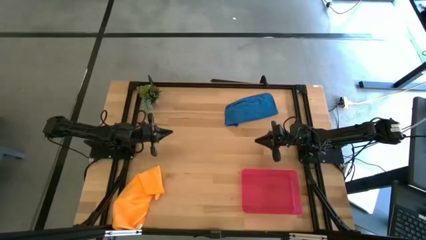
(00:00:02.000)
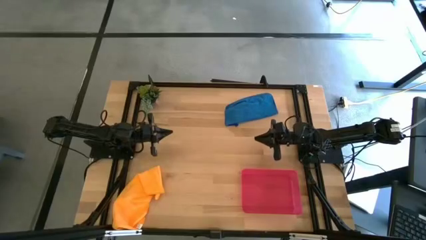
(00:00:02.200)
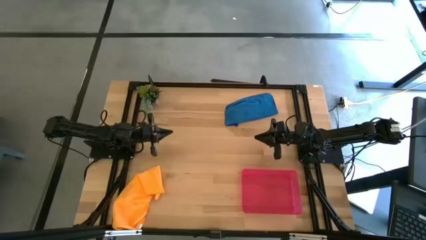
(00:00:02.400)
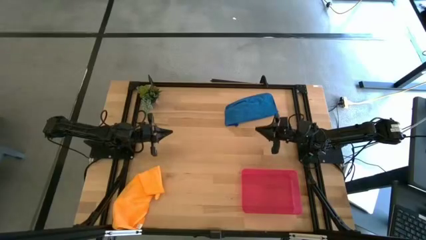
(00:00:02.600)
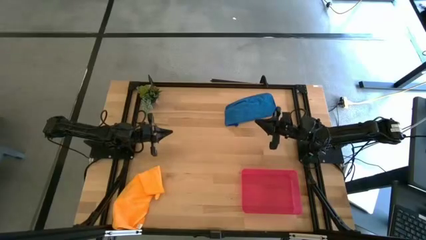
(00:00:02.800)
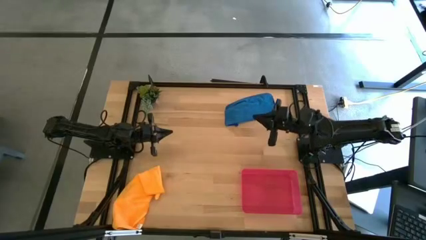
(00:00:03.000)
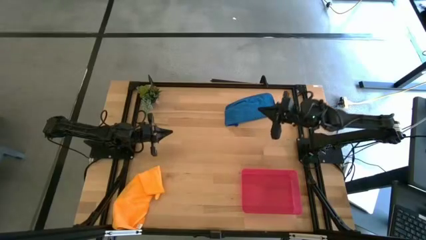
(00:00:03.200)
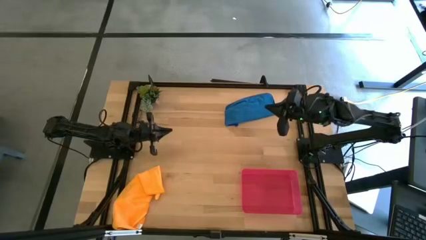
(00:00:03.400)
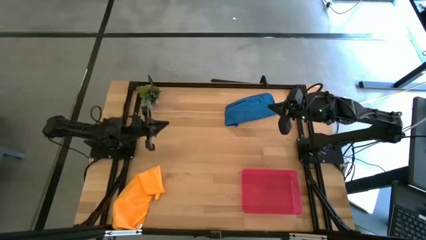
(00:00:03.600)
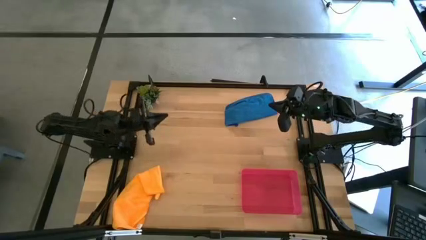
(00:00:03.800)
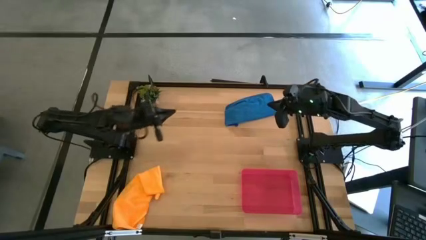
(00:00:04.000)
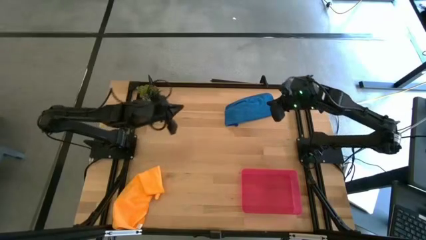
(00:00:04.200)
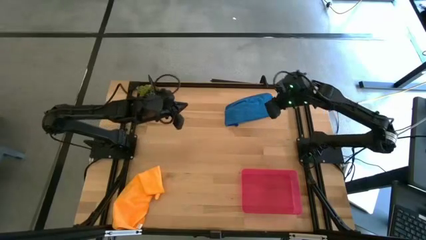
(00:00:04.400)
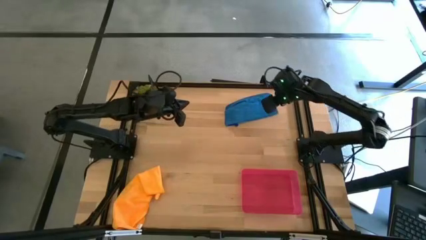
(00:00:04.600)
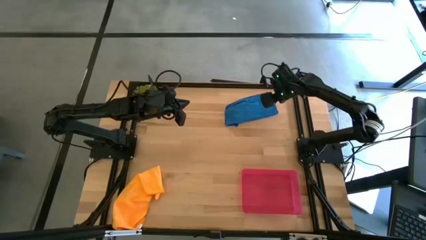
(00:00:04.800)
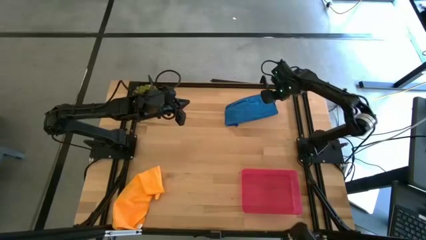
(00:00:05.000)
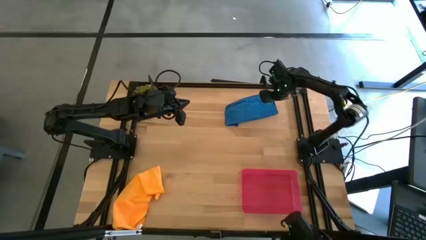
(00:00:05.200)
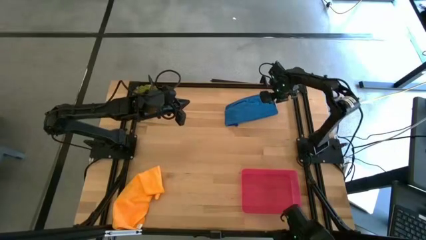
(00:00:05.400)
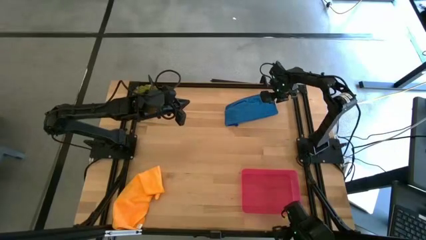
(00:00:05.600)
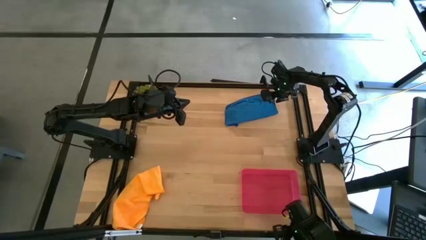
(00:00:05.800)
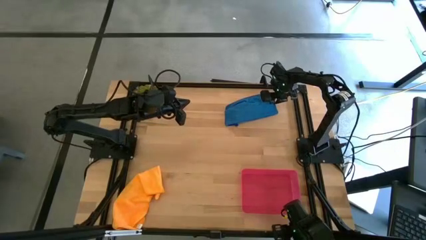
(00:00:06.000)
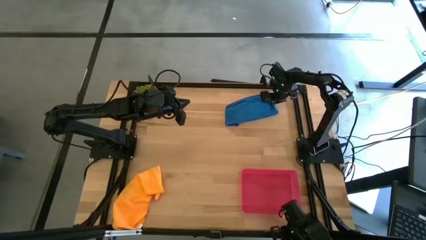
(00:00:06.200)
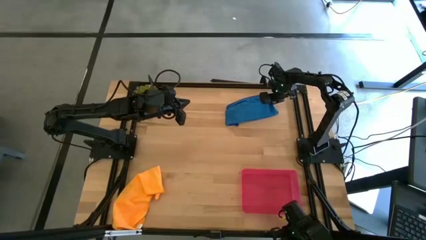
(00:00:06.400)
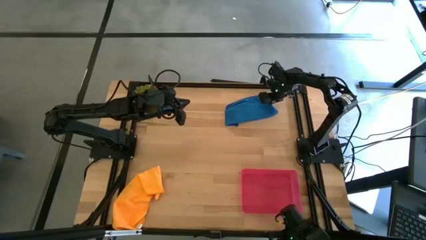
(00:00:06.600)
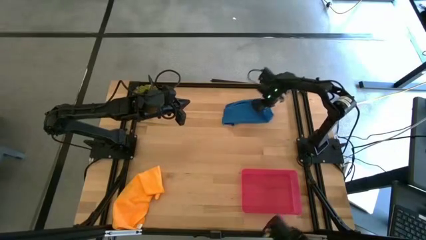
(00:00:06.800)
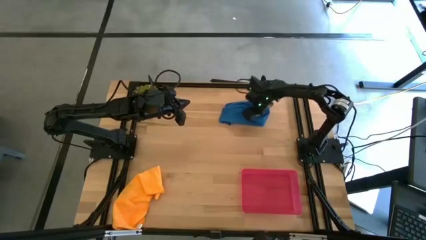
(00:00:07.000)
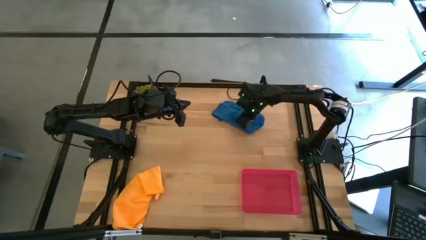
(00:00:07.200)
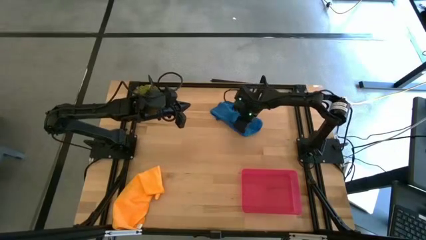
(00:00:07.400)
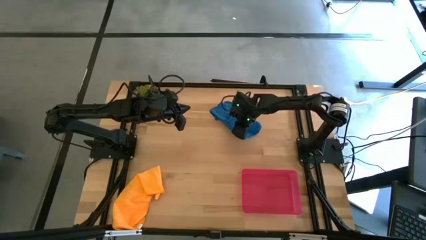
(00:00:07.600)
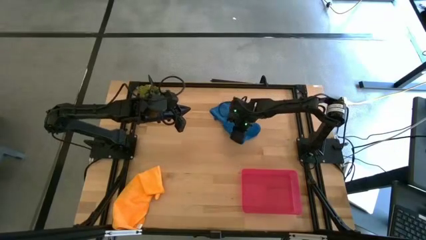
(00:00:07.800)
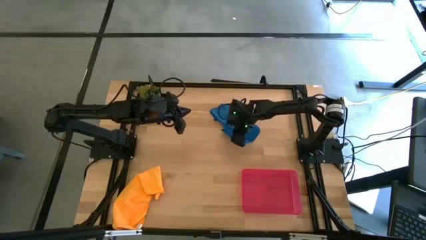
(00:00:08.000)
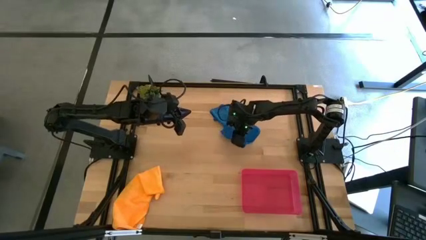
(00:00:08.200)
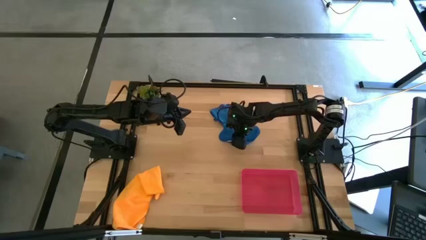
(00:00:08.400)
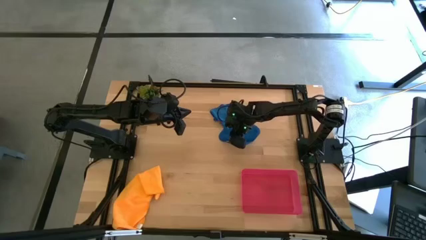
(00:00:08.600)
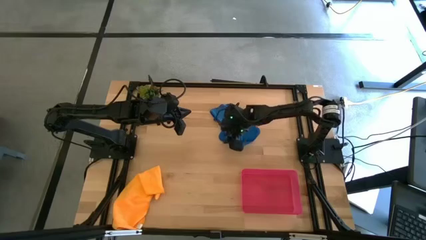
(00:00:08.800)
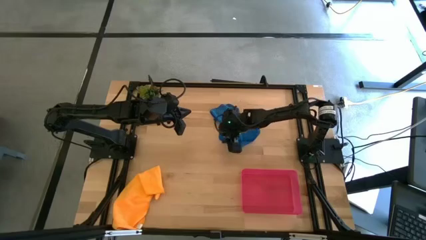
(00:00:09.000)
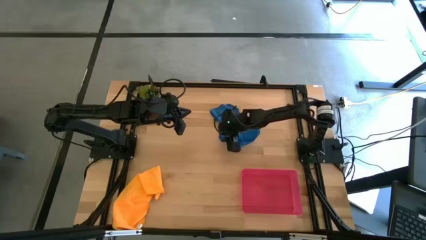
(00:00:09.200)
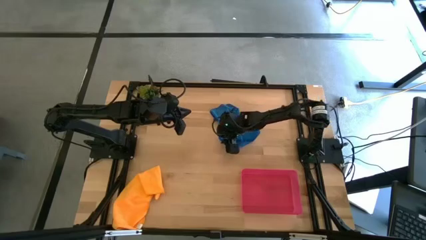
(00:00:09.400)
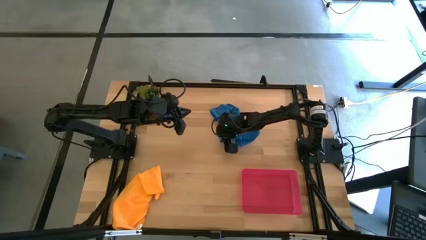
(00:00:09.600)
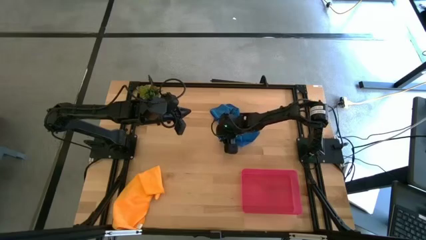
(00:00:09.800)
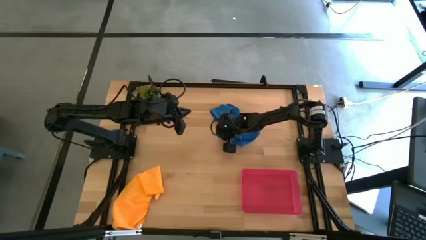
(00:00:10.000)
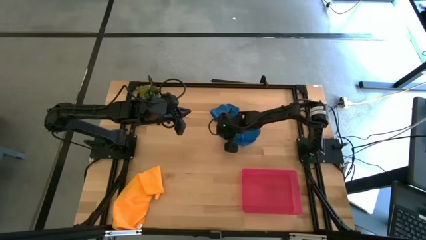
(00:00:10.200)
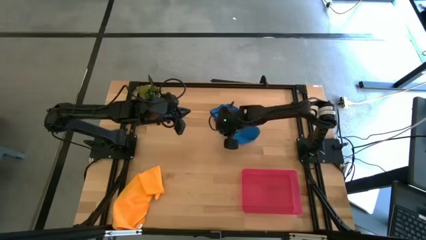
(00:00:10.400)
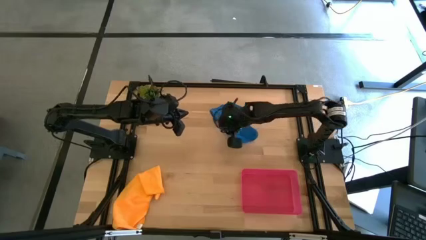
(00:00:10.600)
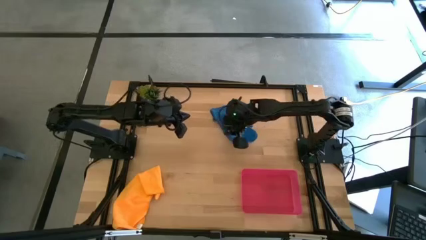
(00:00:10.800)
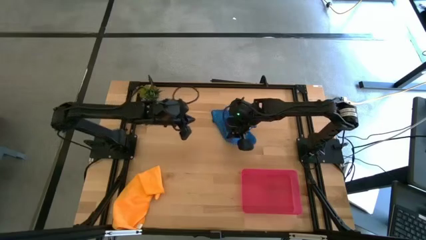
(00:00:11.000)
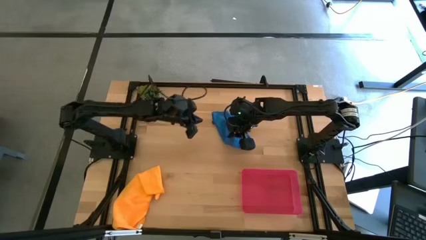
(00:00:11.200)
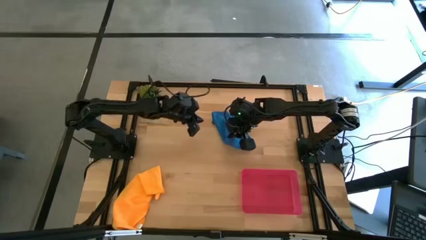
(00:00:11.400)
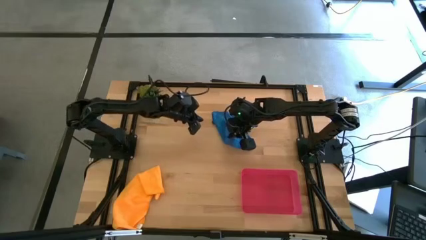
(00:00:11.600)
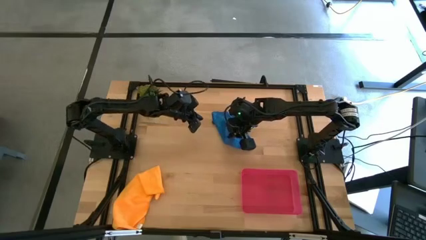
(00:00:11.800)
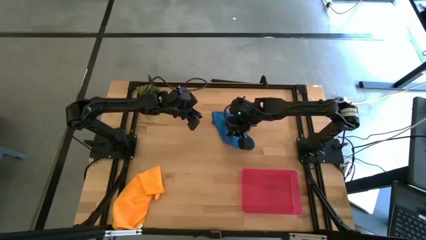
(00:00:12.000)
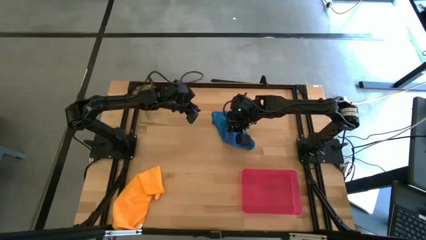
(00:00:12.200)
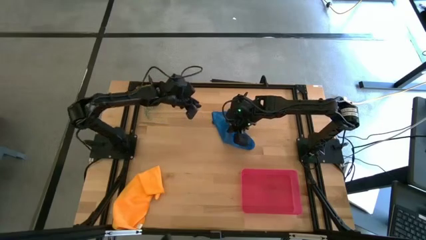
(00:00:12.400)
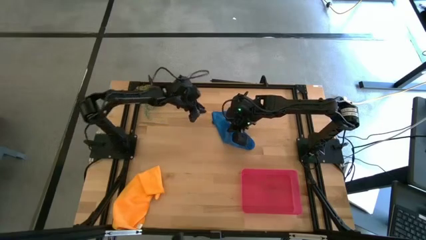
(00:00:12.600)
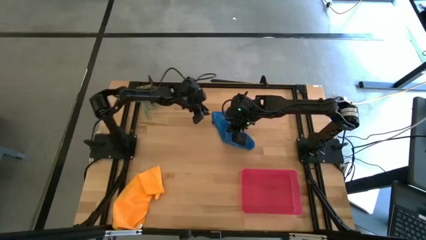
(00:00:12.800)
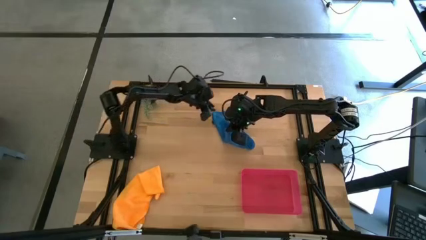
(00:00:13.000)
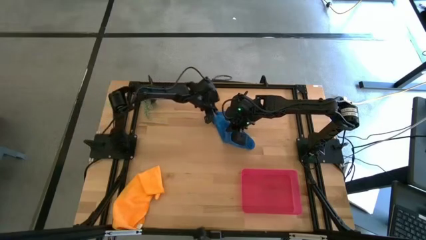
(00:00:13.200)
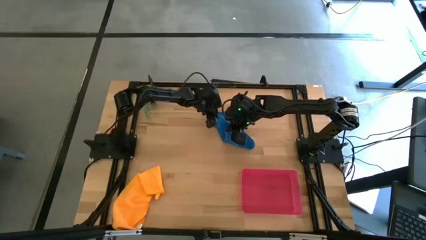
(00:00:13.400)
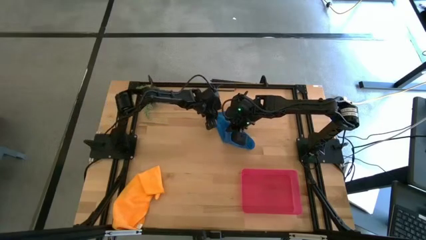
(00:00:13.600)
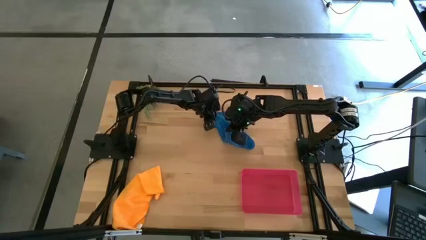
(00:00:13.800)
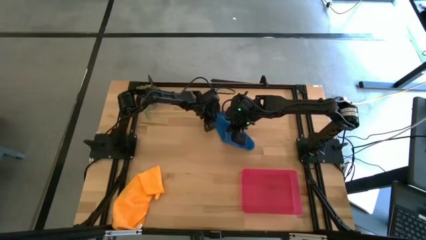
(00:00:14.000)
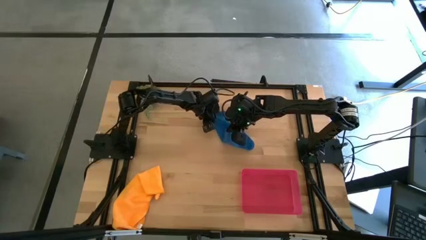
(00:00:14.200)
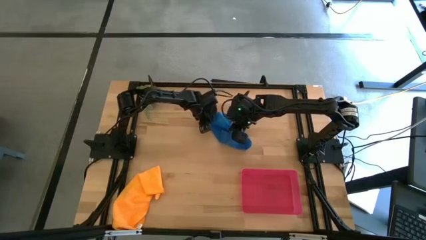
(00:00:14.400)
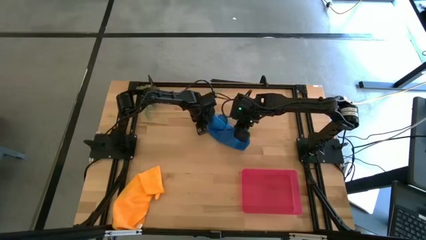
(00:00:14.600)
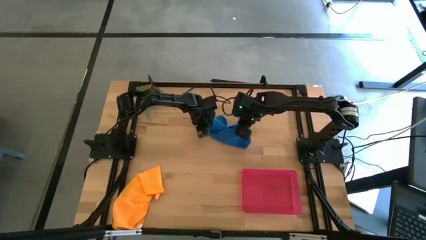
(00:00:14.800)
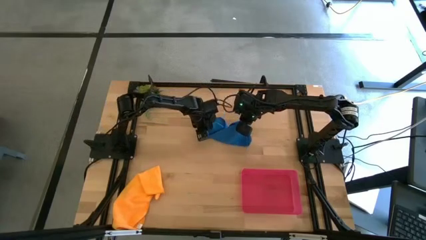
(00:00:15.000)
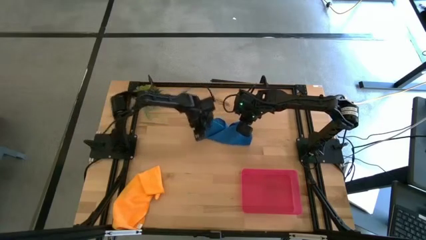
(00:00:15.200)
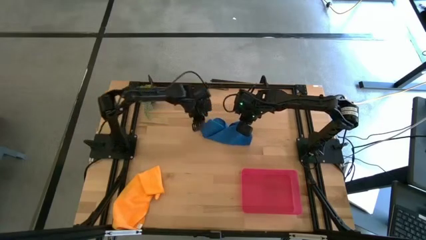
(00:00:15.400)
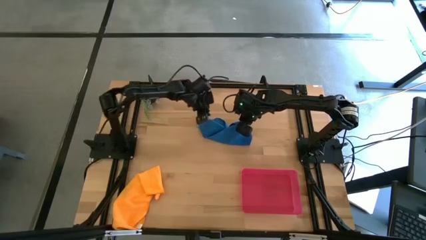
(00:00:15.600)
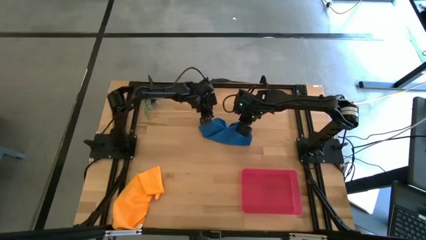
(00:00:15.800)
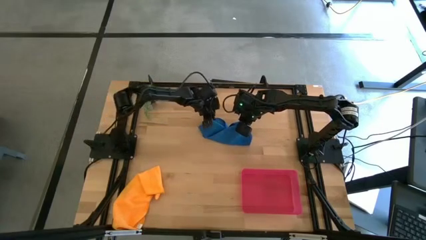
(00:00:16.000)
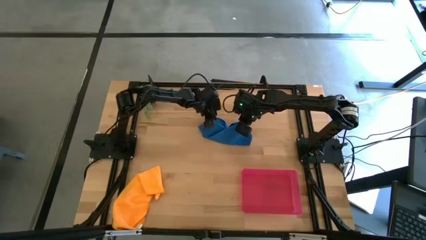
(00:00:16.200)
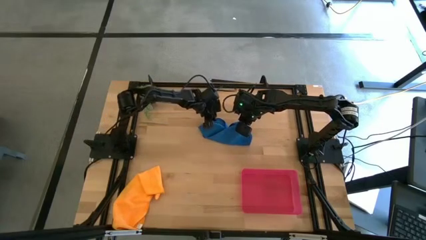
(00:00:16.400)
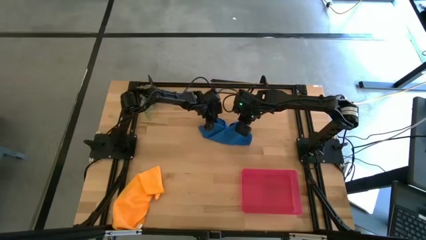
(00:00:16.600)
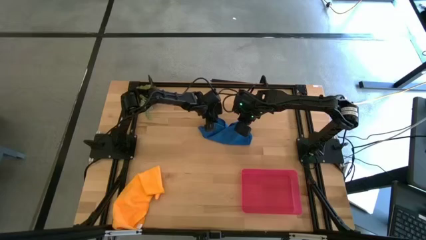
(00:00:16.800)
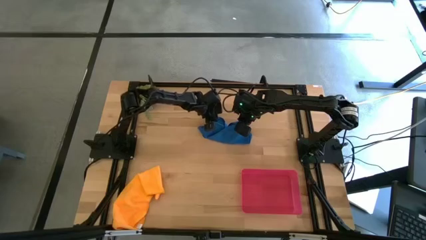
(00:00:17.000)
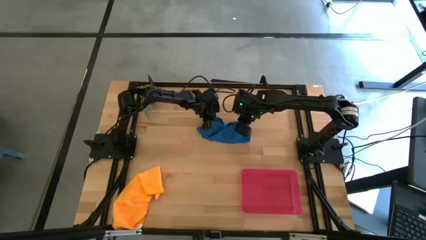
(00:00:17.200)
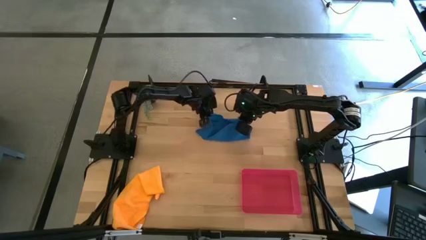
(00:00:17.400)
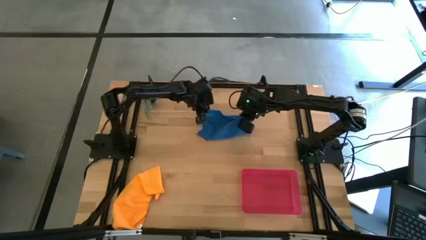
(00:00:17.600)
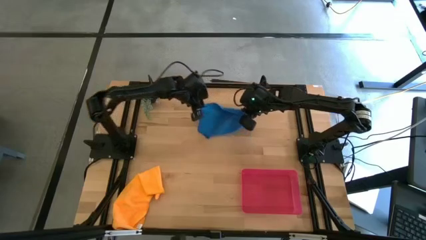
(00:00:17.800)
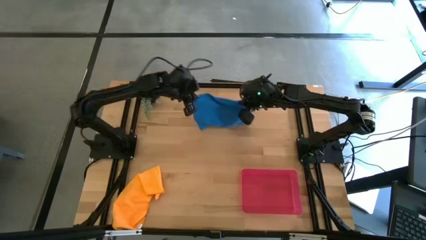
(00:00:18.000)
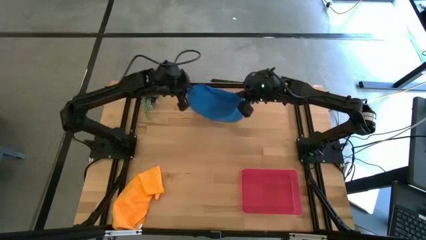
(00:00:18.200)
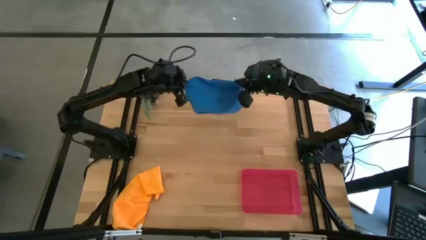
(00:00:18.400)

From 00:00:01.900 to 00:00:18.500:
Task: Roll microfiber towels into tight, uniform cylinder then place into a basket
Fold the blue microfiber towel
